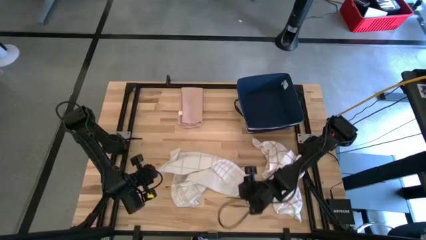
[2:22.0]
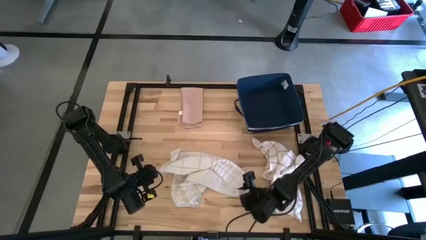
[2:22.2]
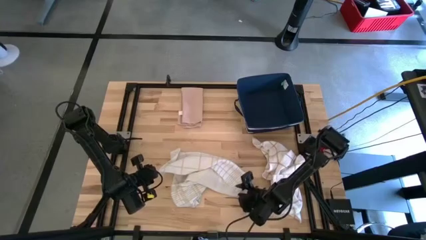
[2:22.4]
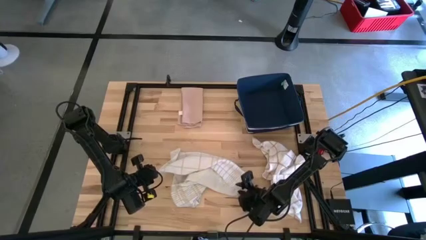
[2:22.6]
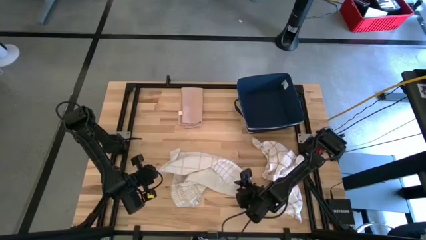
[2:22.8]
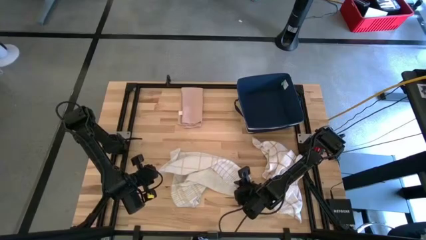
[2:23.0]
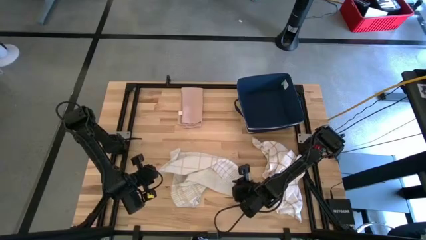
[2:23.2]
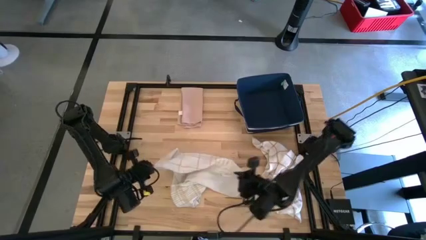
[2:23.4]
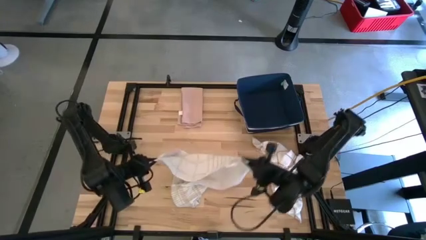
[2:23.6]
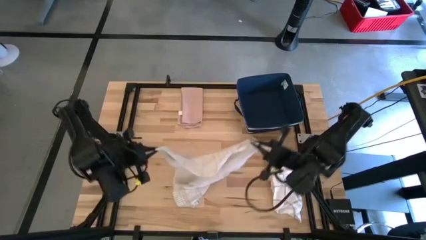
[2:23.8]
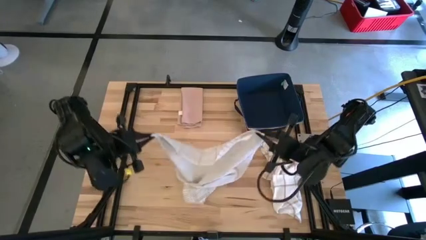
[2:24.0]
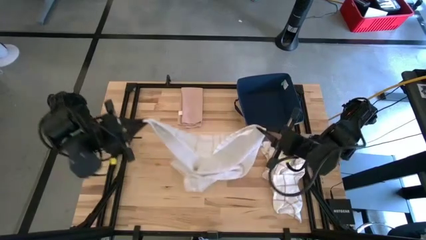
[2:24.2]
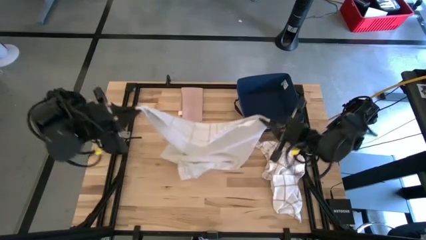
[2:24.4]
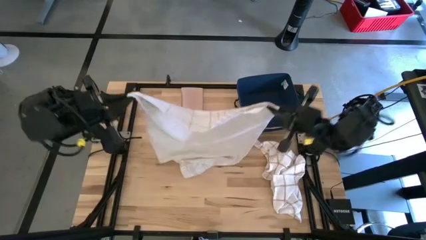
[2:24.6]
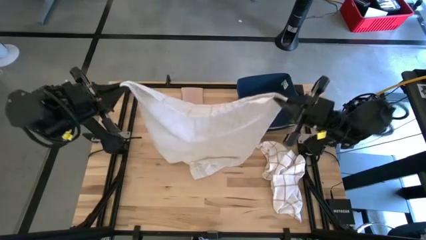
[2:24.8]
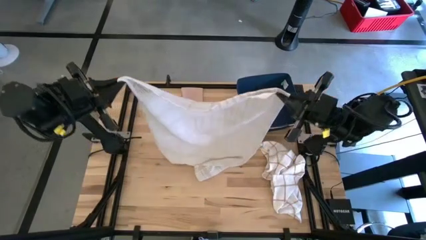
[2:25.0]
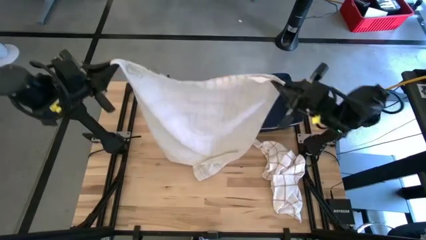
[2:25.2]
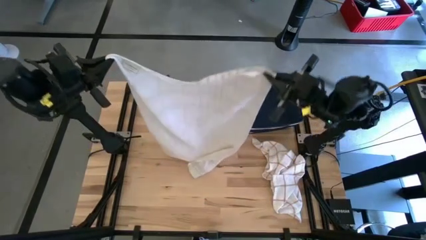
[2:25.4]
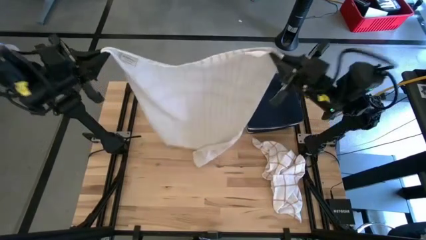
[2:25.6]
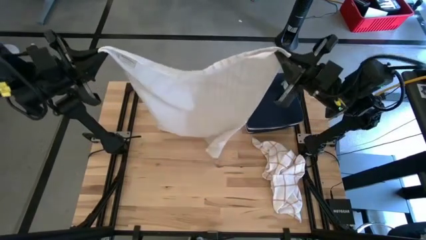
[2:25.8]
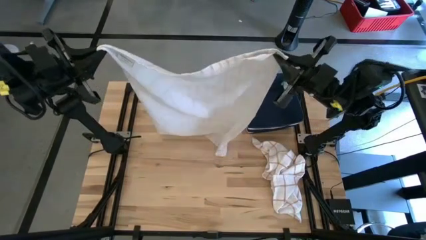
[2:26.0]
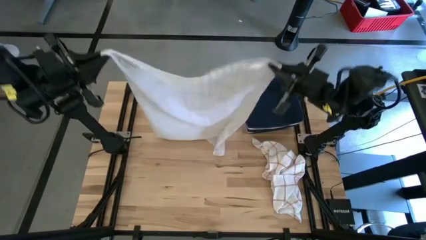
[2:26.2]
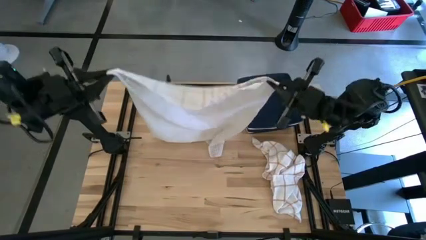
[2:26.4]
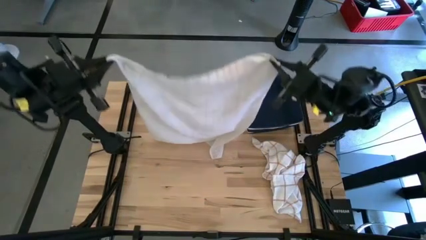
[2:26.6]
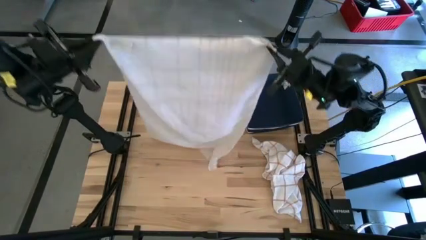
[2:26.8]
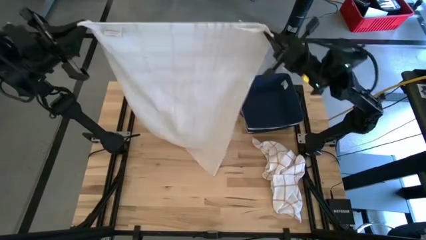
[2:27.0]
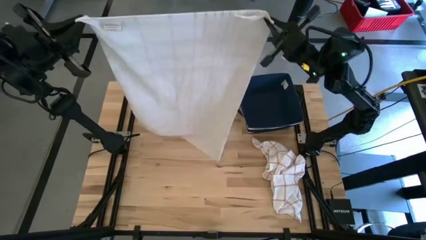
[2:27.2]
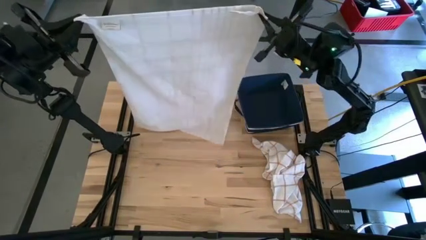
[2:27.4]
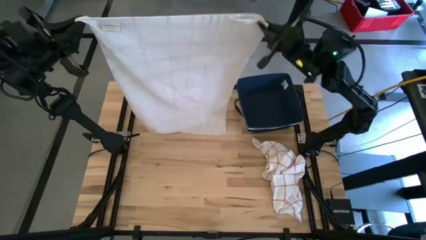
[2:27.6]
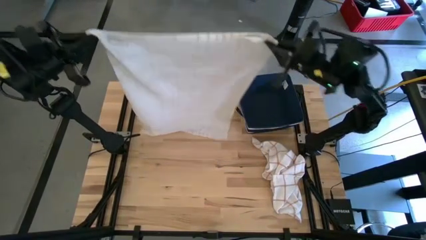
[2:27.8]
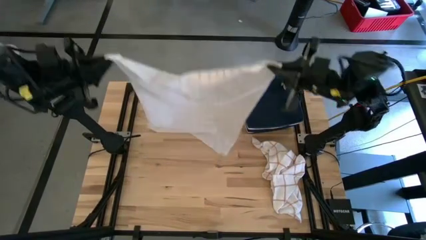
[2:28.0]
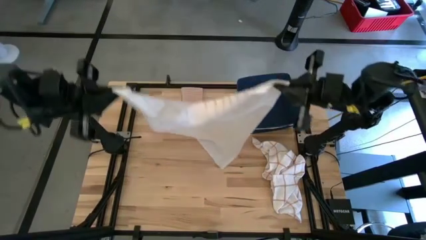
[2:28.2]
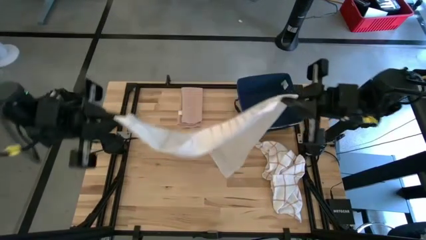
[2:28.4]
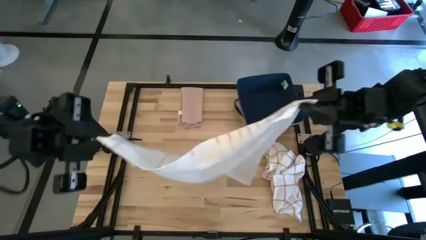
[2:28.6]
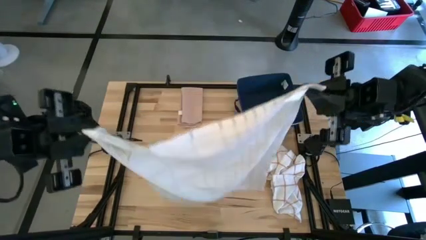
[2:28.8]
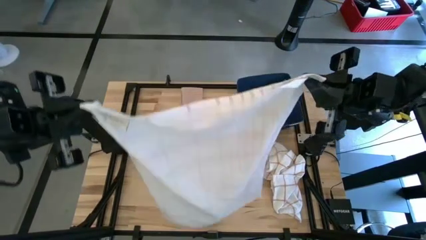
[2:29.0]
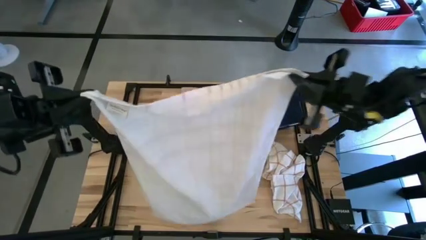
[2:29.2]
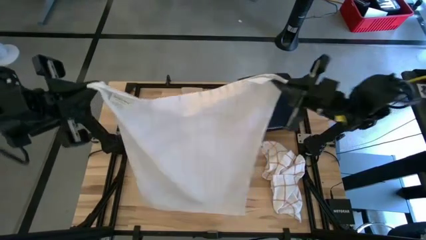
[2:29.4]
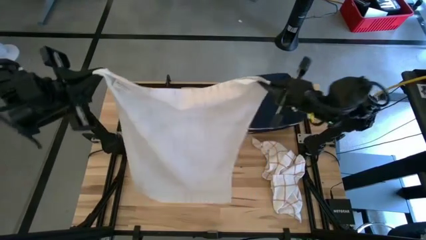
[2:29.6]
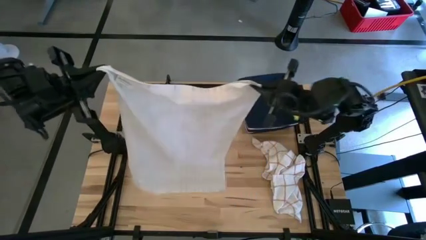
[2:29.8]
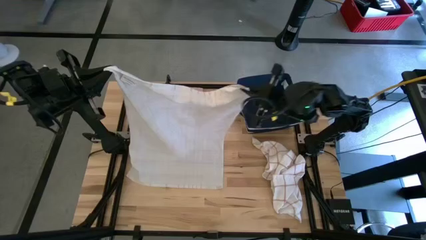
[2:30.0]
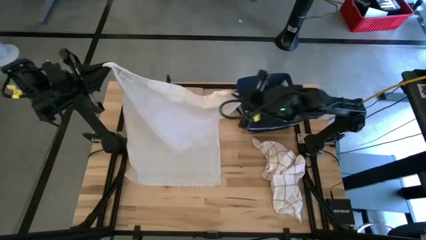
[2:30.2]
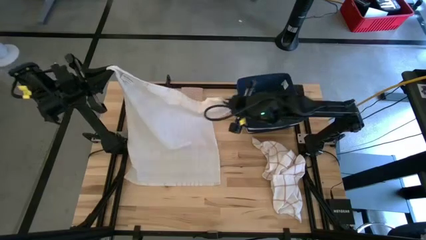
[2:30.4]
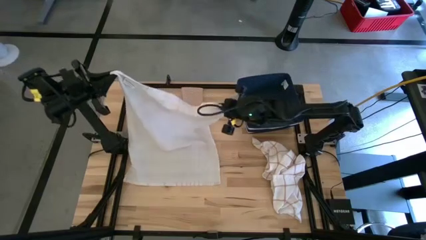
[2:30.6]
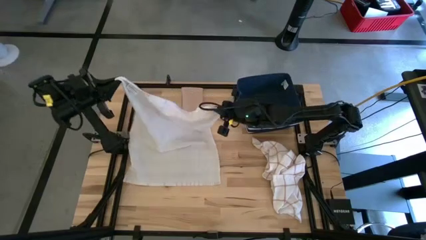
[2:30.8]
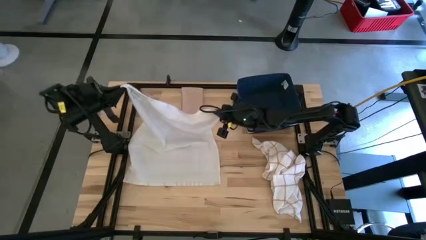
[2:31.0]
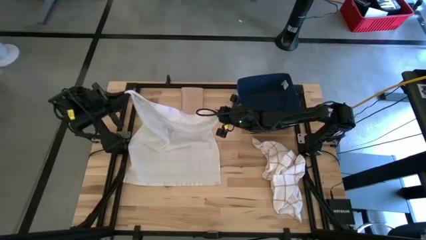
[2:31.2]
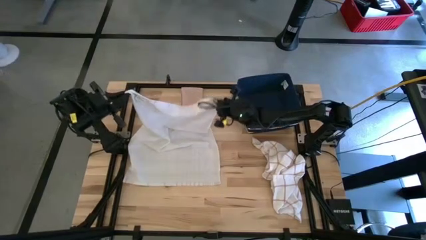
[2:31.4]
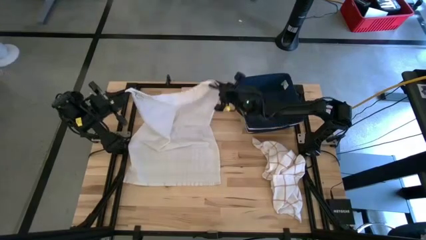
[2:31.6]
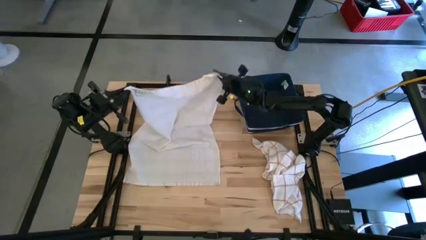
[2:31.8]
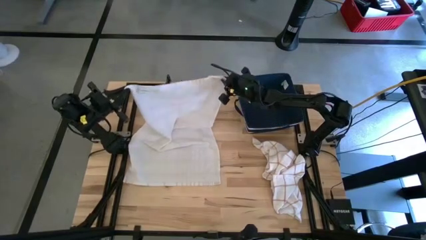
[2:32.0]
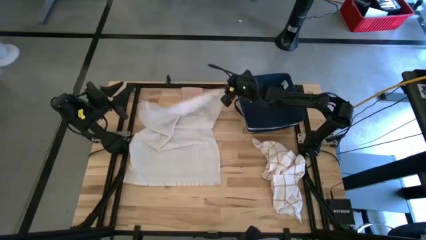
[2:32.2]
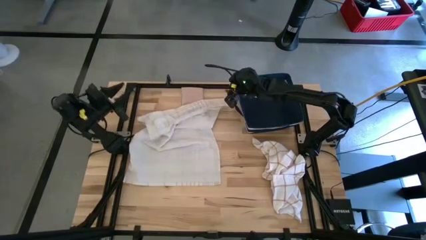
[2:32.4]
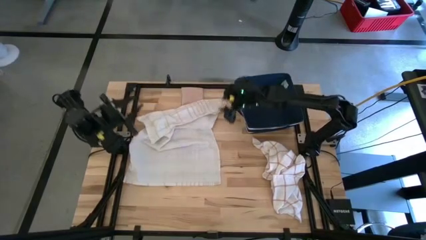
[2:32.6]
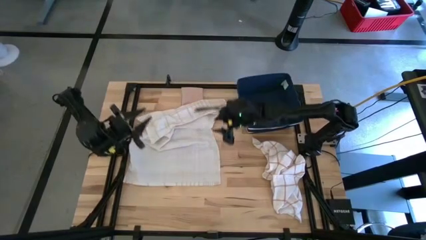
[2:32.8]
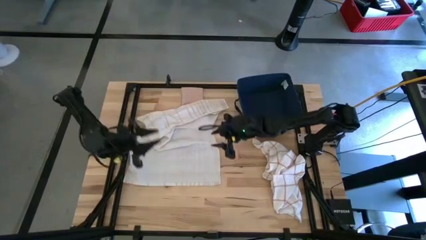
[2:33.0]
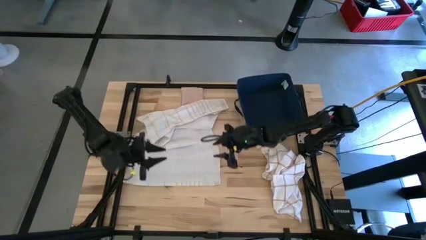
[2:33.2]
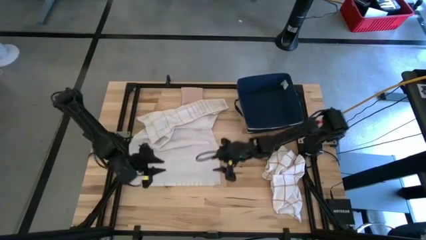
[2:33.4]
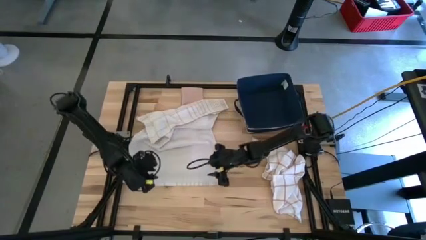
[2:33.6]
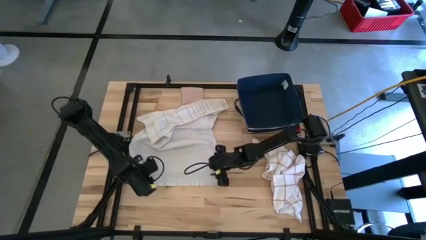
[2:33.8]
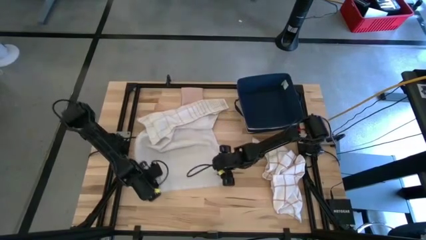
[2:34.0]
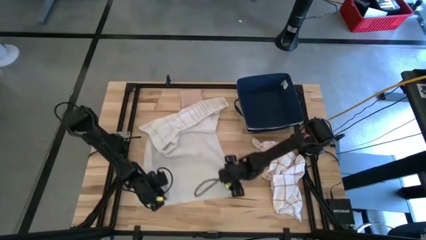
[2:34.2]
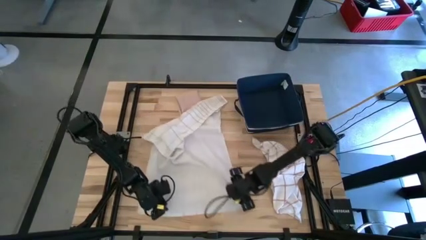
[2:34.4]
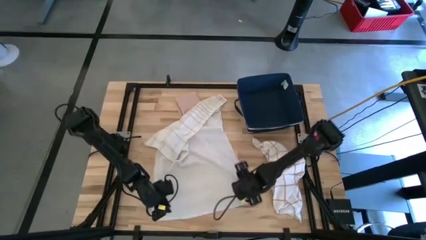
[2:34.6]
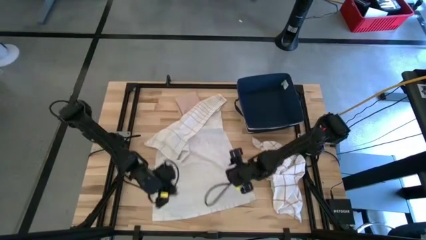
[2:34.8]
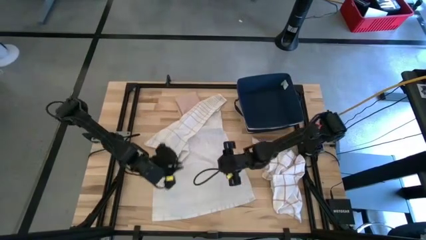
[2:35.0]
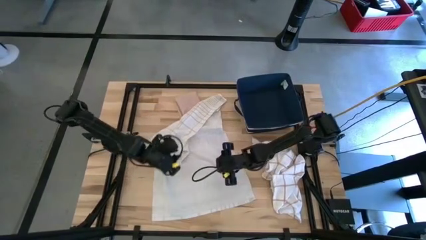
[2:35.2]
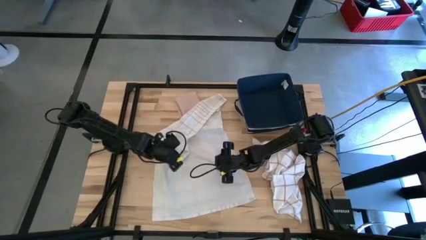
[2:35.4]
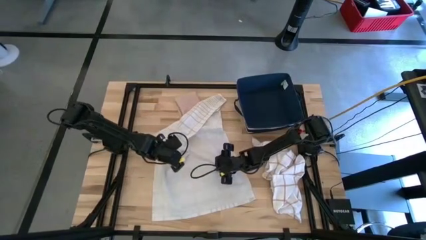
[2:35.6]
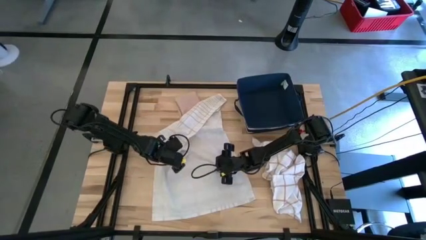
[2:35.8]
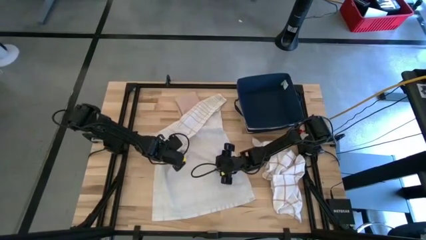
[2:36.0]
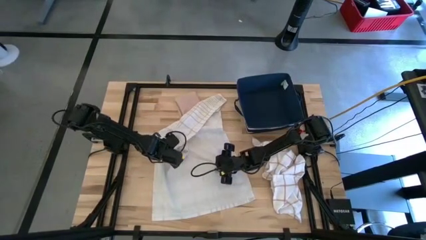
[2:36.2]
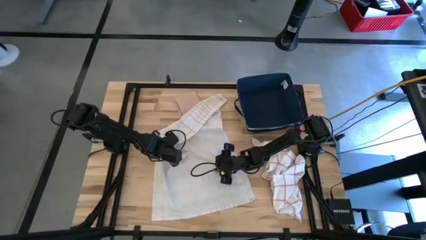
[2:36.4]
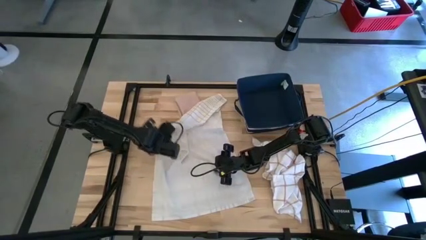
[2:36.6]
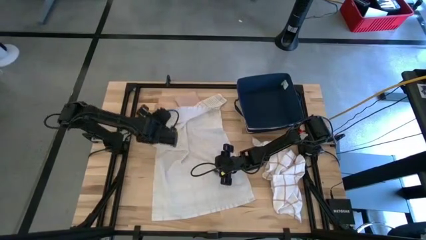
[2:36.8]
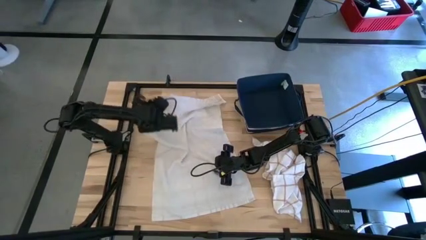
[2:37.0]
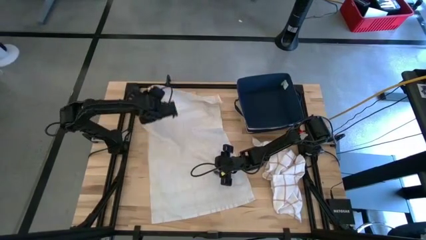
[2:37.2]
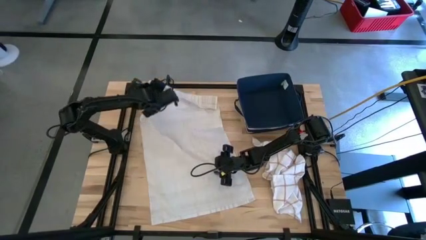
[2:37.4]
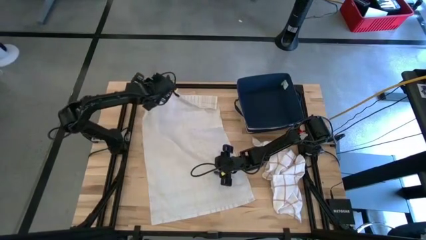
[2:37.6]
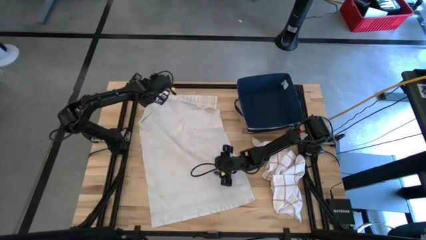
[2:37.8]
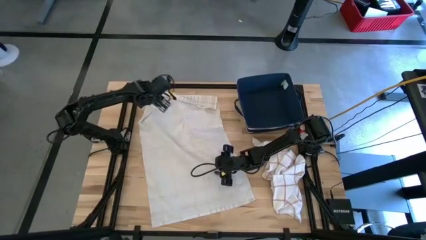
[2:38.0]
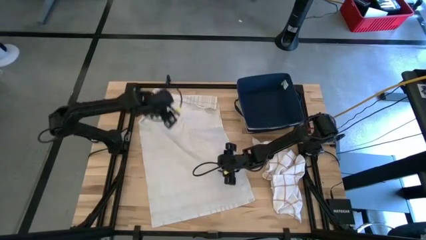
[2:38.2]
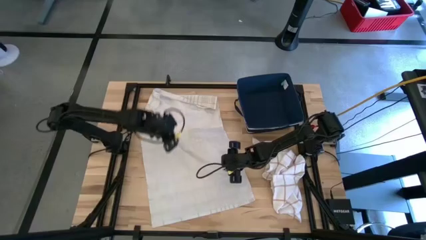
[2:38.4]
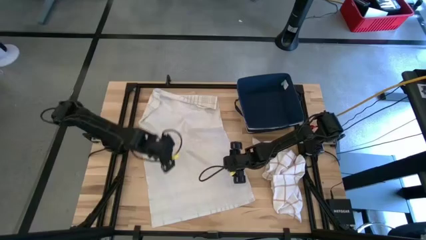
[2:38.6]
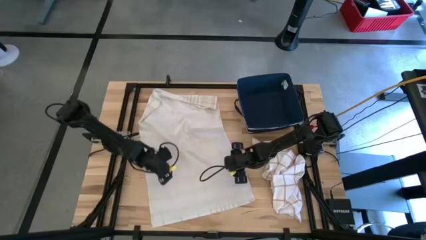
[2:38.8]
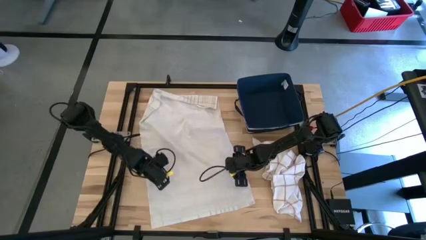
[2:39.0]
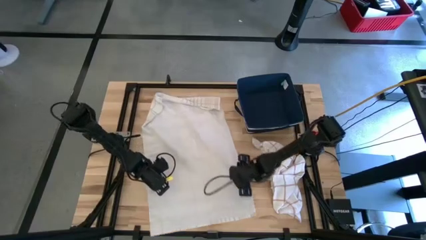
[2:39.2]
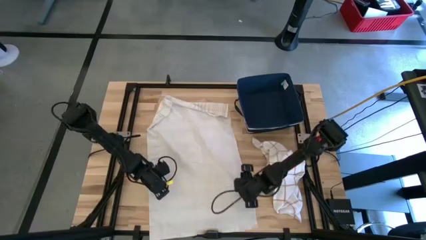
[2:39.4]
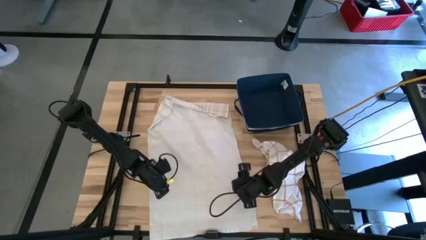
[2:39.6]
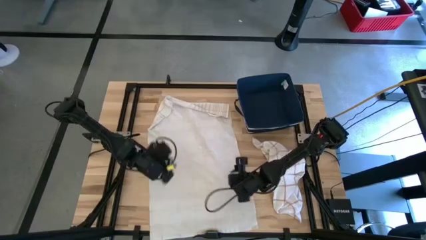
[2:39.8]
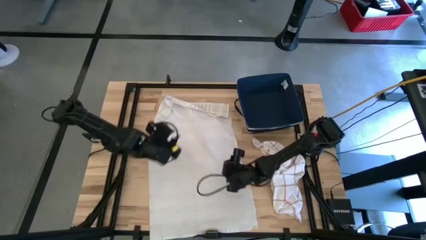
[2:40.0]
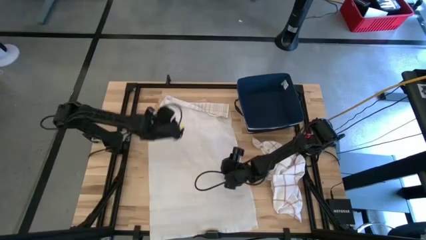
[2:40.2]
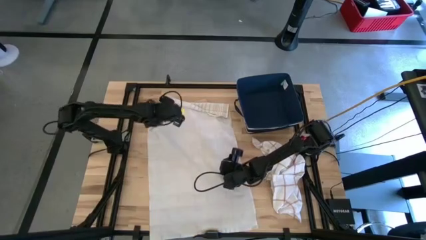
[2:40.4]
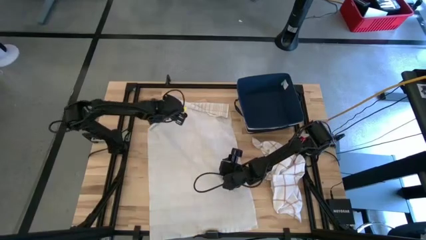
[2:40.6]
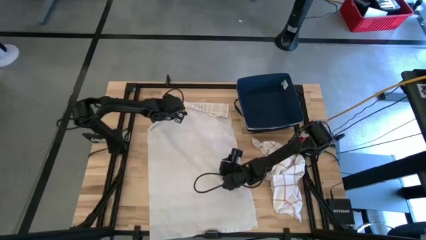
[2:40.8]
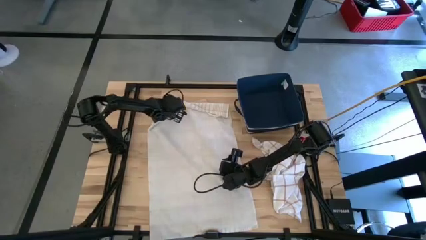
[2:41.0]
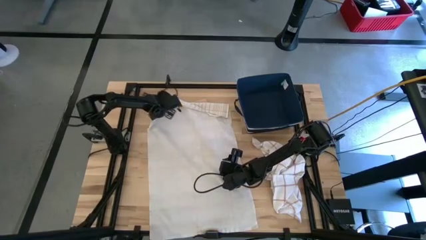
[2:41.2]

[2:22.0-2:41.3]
Task: Fold towel
Fold the white patterned towel
